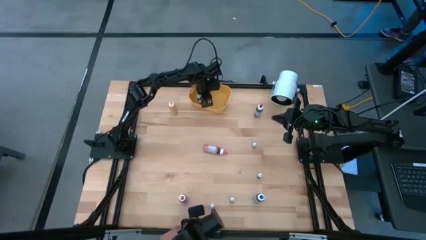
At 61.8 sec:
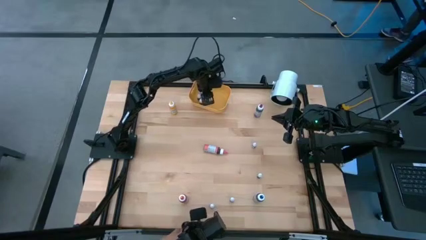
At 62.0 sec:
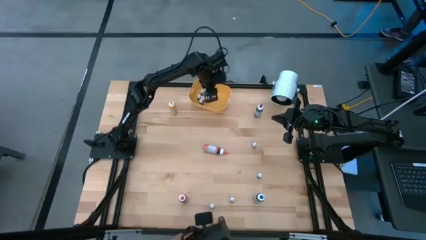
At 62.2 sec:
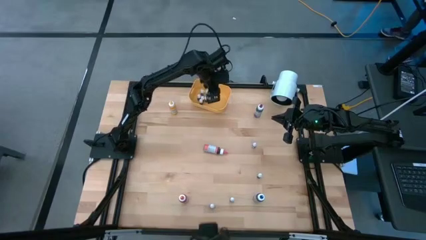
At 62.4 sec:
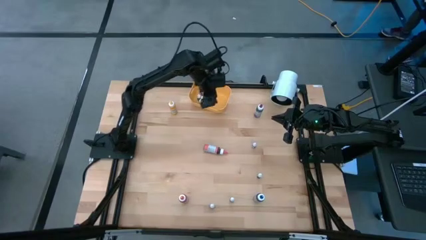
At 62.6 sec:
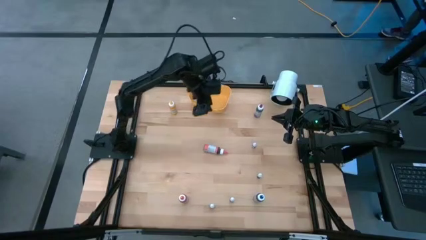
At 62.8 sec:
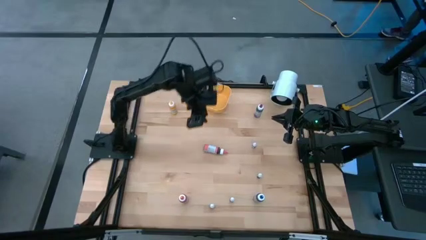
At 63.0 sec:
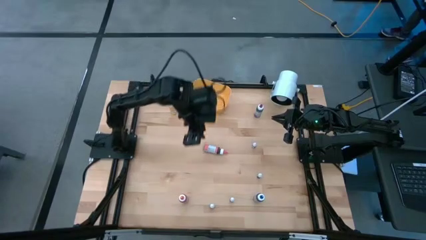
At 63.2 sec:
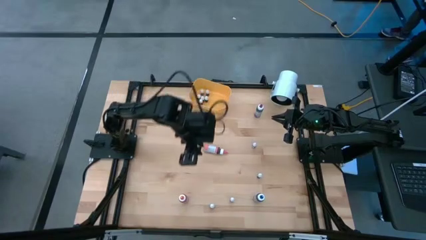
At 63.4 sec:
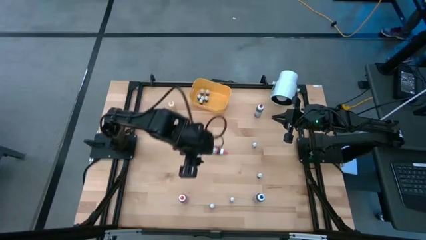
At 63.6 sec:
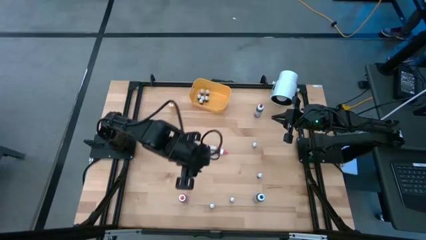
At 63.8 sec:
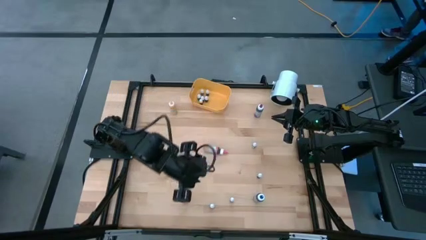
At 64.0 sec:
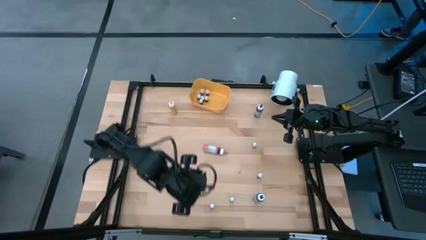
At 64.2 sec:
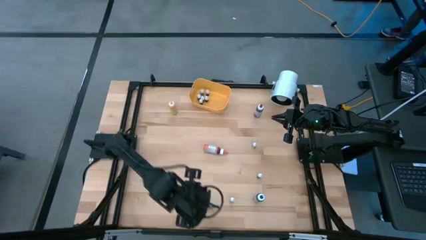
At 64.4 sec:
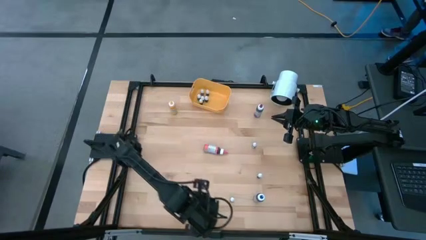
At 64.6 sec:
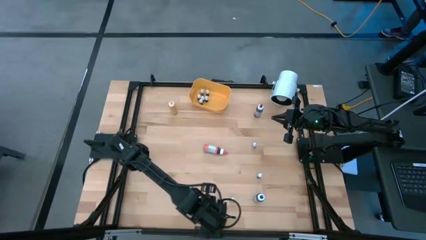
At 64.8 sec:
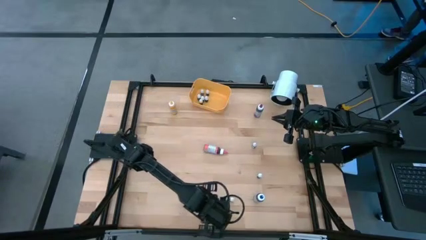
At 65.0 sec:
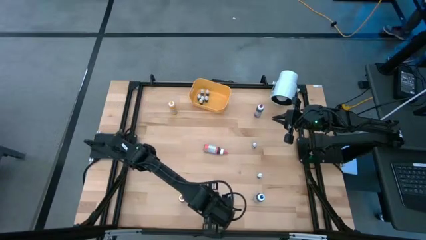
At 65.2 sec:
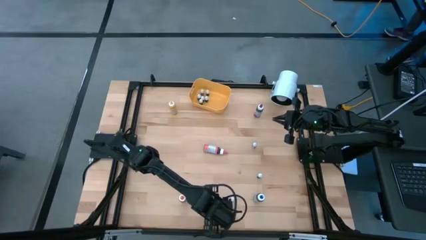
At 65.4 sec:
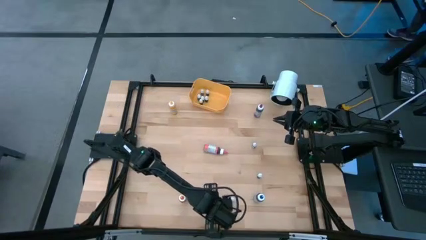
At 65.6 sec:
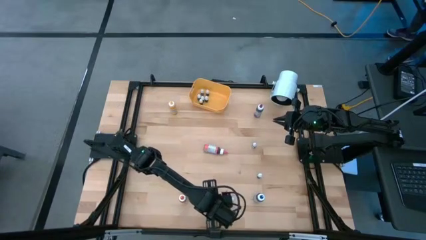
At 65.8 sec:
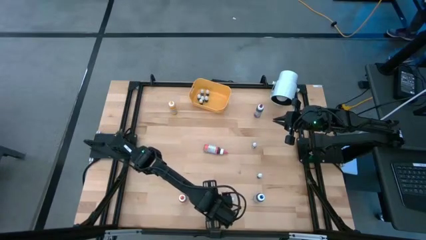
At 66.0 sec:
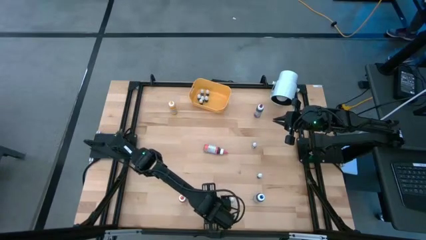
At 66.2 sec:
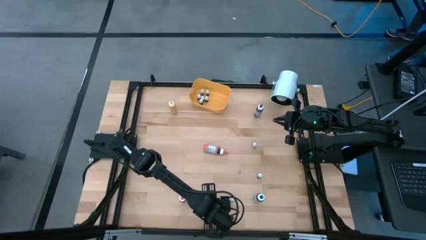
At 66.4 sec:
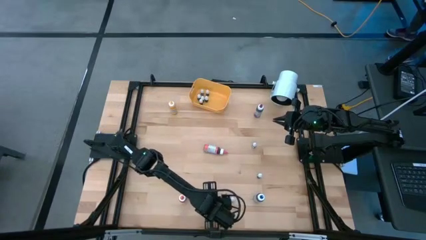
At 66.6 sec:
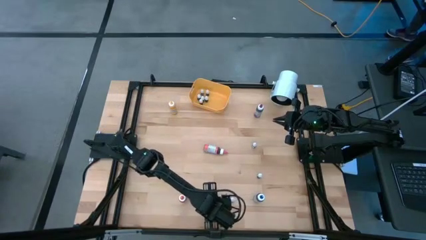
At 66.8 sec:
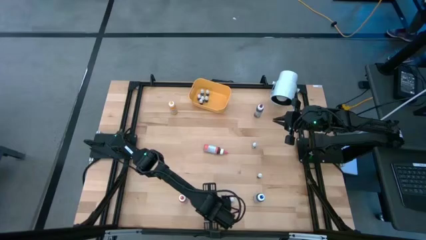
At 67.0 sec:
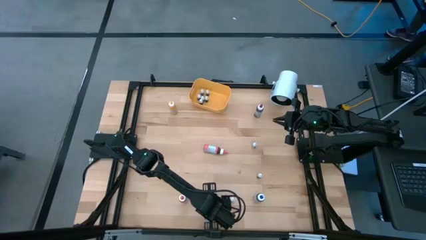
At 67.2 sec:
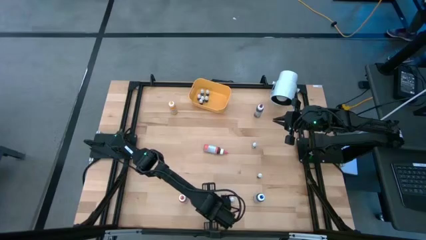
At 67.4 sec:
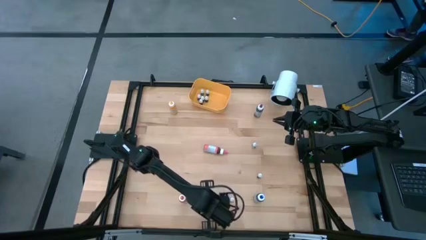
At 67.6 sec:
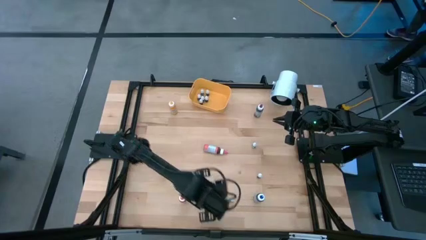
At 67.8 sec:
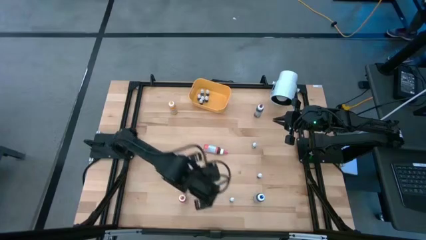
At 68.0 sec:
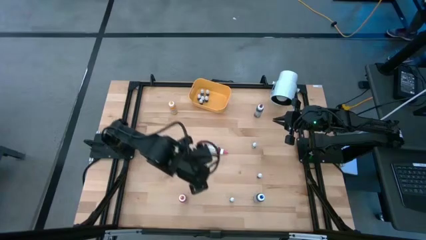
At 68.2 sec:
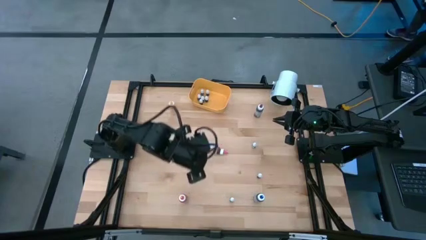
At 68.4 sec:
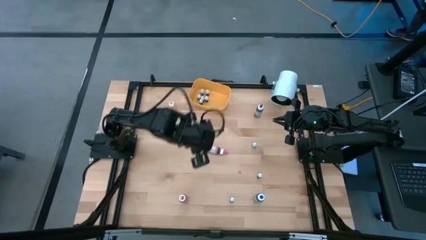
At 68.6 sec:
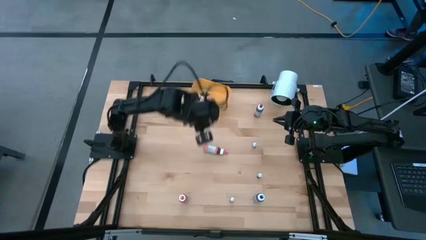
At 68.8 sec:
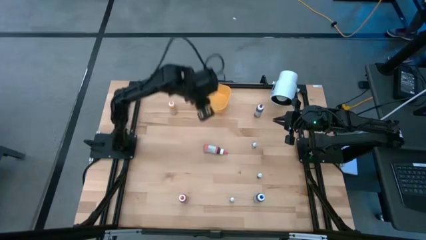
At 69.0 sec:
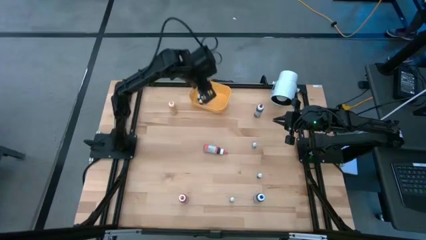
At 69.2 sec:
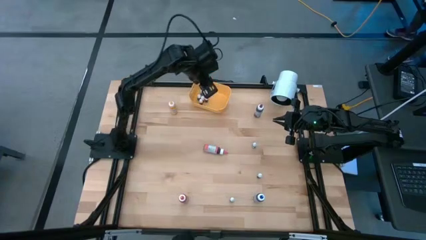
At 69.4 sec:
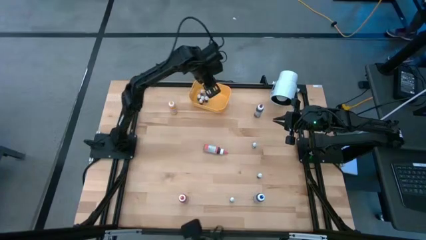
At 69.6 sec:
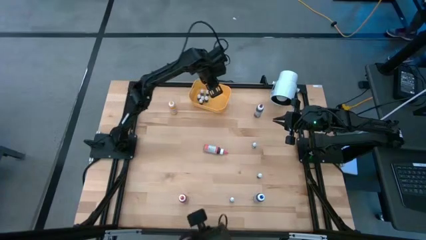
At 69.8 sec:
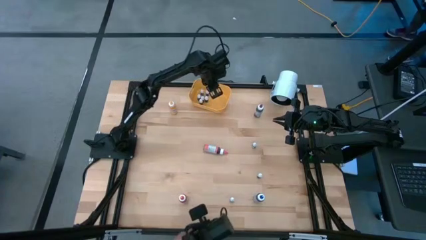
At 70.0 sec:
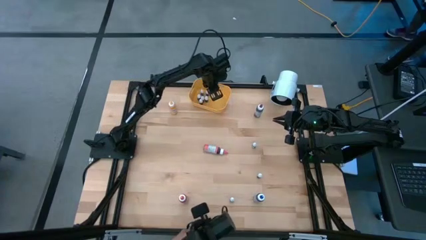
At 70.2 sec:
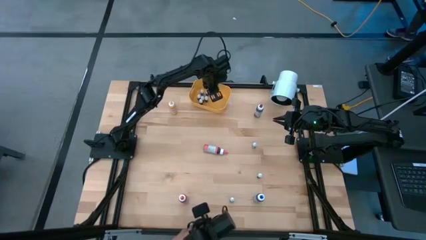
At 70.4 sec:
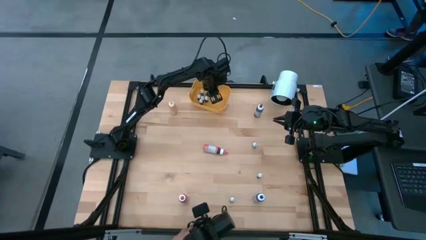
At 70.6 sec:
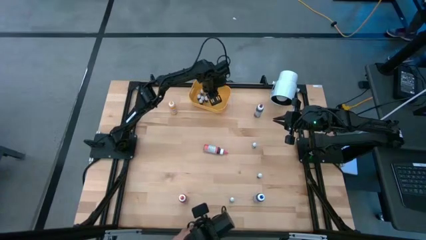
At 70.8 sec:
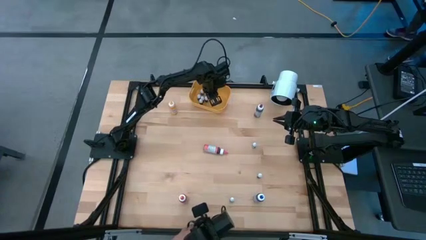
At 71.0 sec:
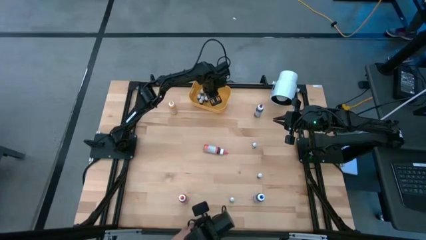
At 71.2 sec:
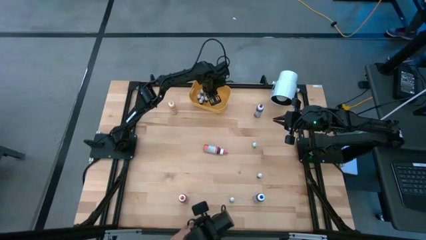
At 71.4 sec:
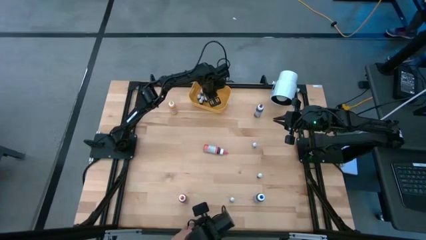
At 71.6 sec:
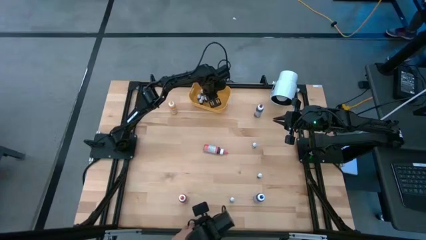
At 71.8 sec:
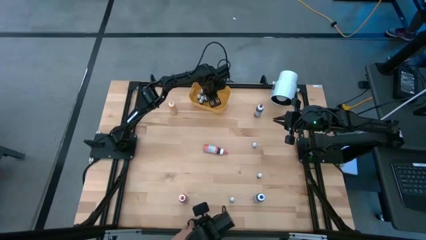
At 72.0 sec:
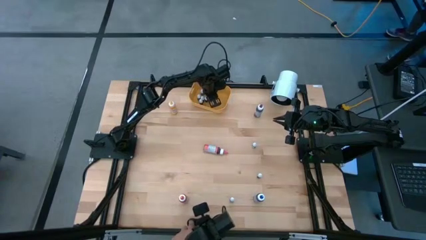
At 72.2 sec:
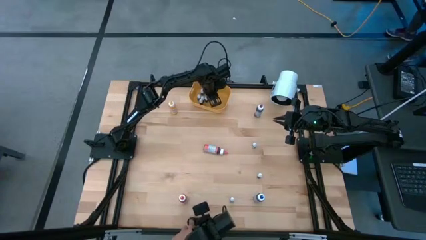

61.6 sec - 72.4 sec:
Task: Pick & Place food coloring
Put the small pink food coloring bottle into the bin

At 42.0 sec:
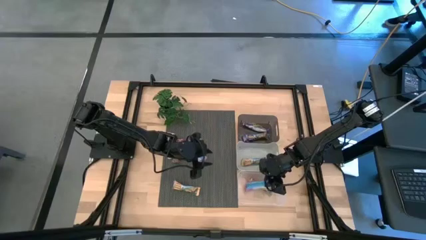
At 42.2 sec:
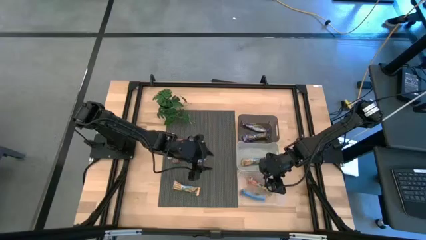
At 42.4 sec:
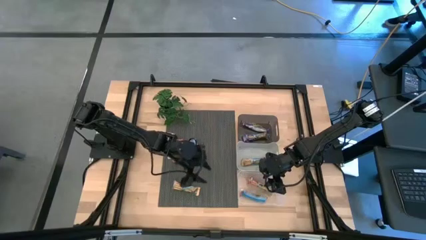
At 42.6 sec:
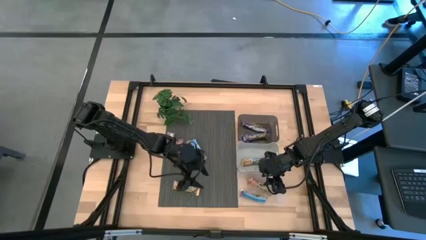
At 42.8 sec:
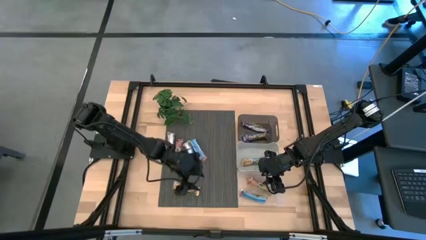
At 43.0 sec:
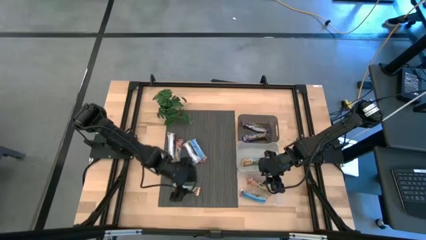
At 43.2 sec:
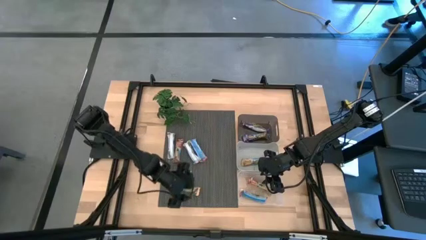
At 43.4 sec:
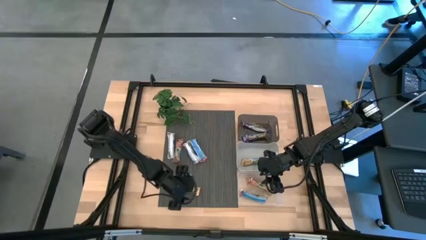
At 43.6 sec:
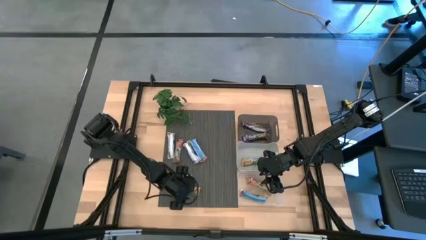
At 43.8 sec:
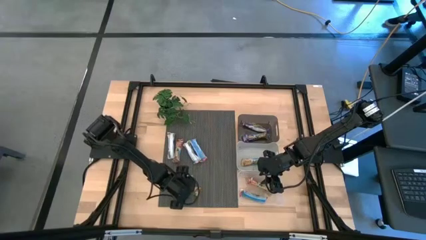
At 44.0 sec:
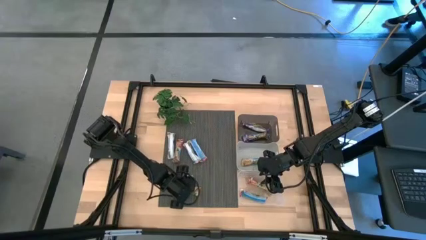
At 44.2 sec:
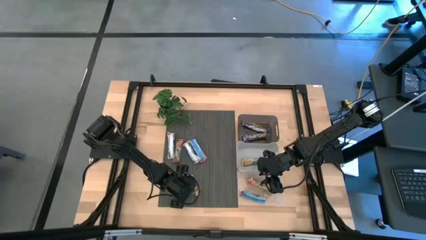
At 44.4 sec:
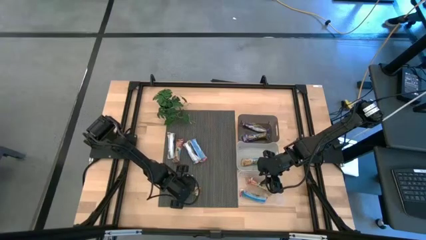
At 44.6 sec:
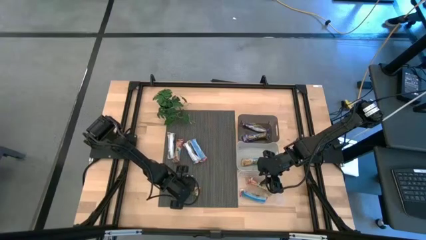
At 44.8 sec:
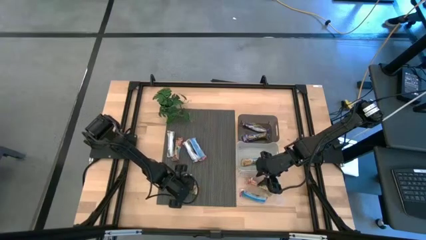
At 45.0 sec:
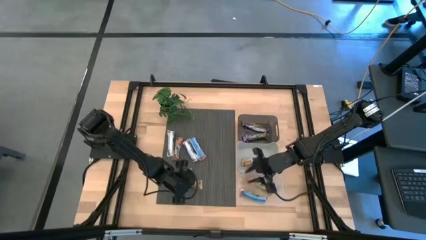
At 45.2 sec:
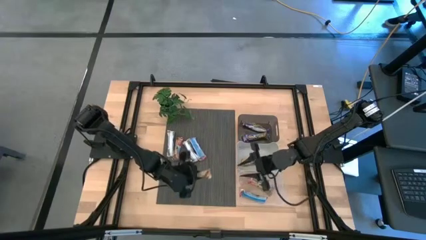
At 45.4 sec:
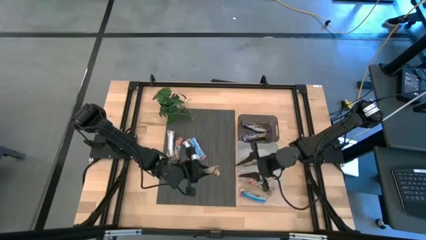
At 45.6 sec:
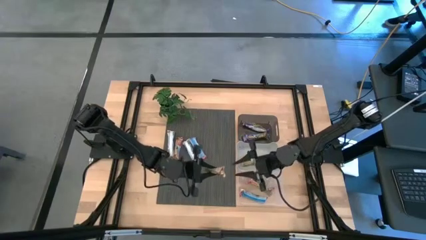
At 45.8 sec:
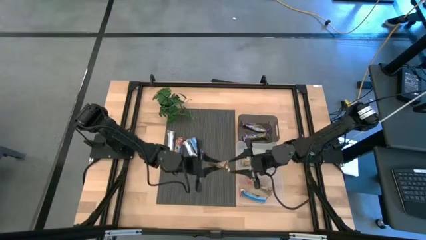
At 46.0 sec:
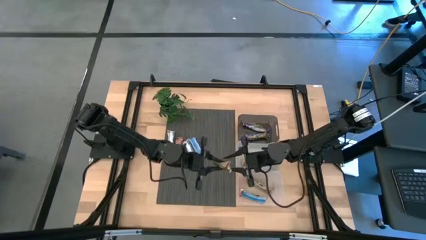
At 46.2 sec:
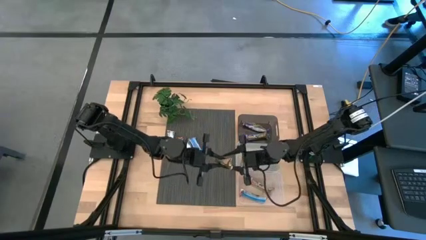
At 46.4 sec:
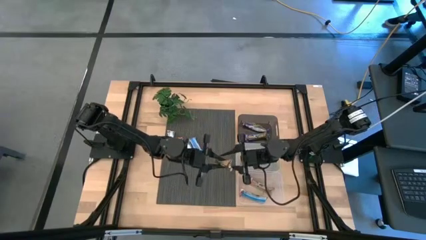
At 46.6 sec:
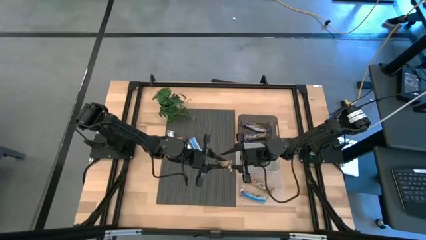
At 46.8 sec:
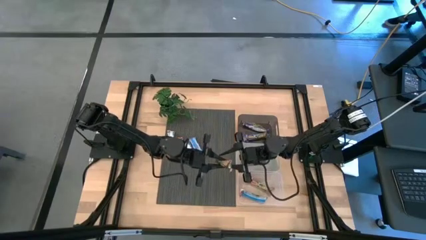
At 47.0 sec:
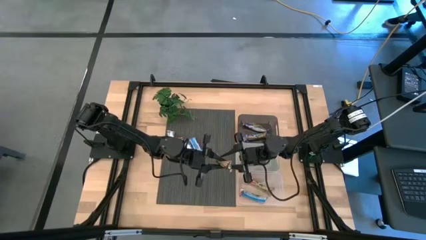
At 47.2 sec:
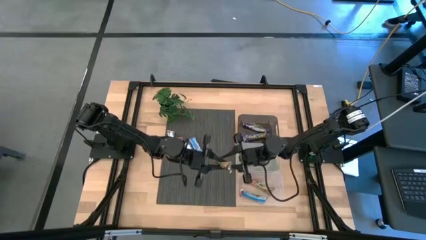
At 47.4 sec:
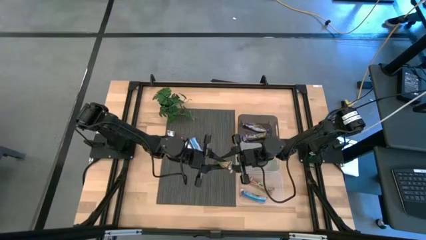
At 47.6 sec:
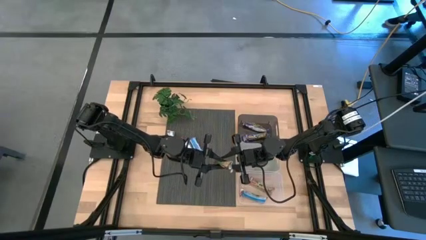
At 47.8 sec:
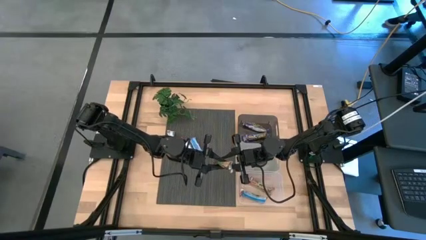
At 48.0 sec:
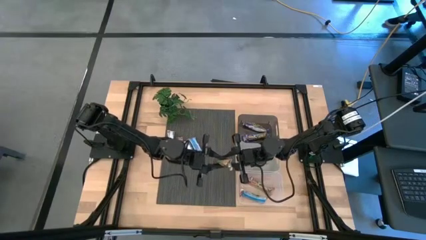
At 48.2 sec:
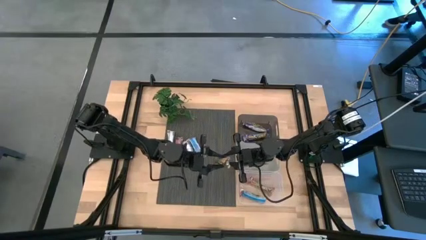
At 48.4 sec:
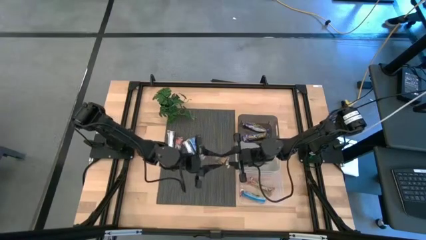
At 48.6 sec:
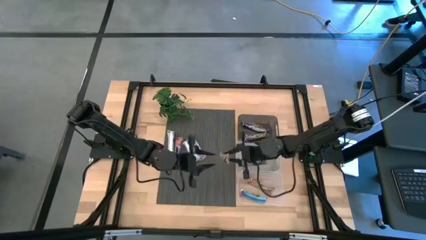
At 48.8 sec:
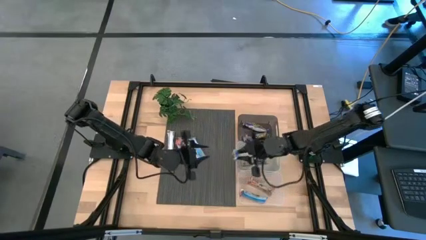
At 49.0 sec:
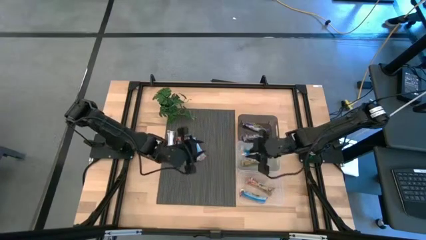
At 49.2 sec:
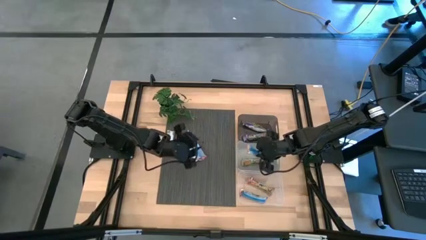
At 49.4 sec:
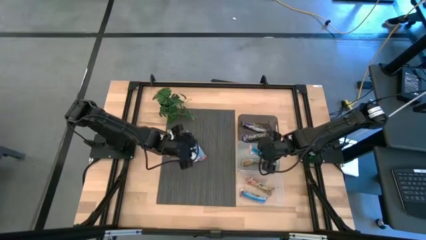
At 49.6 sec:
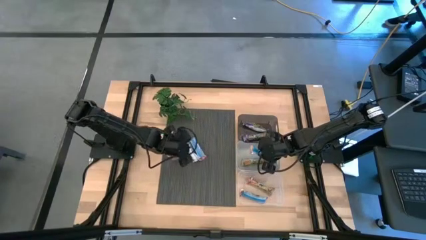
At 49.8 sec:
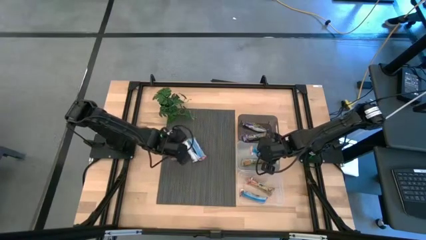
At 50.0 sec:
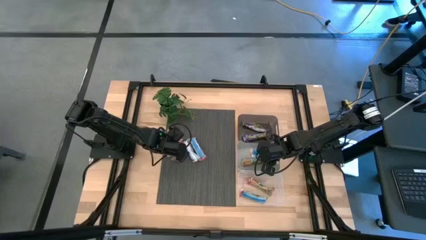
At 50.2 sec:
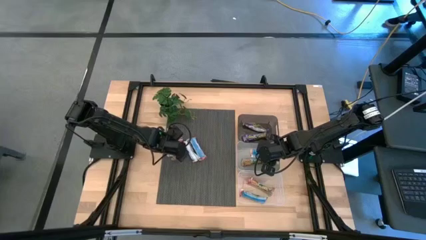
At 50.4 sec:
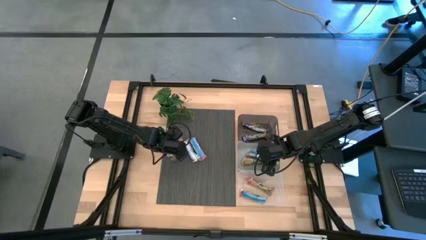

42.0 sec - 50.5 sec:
Task: Pick and place Granola Bars by type
Put the yellow granola bar into the gray bin
